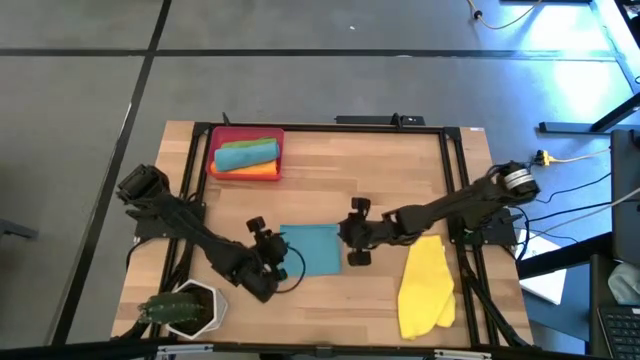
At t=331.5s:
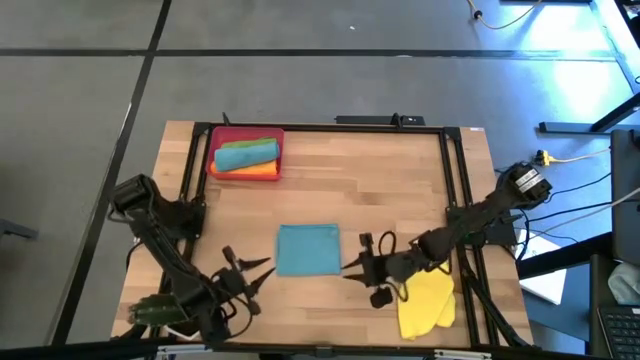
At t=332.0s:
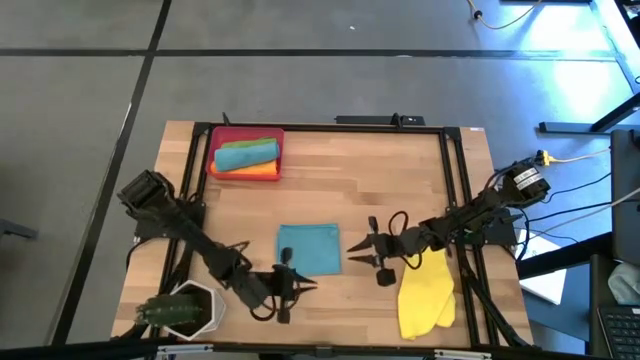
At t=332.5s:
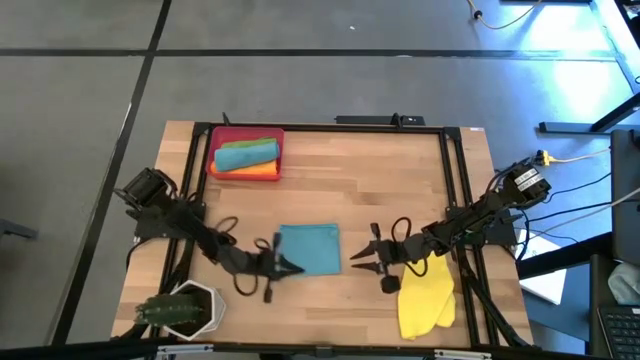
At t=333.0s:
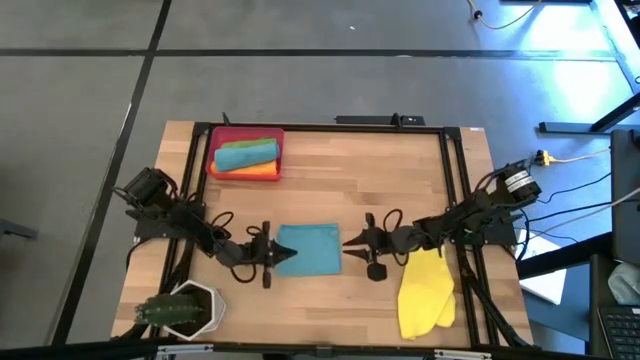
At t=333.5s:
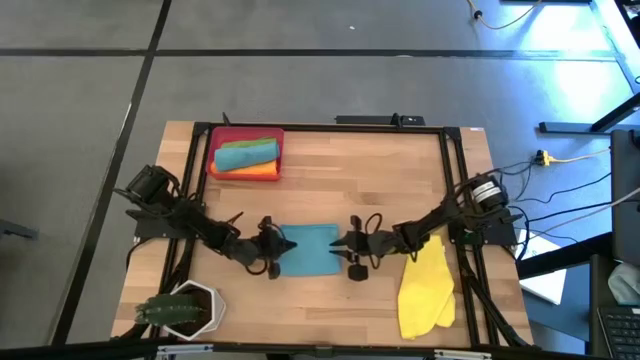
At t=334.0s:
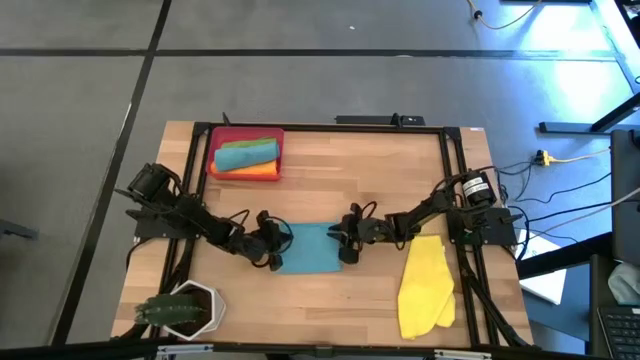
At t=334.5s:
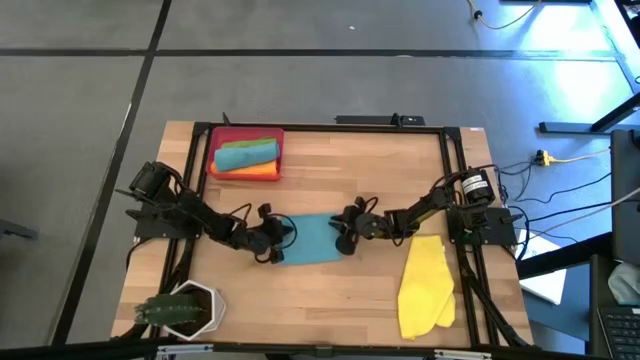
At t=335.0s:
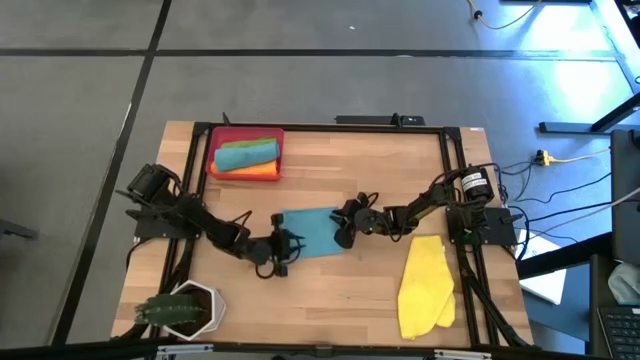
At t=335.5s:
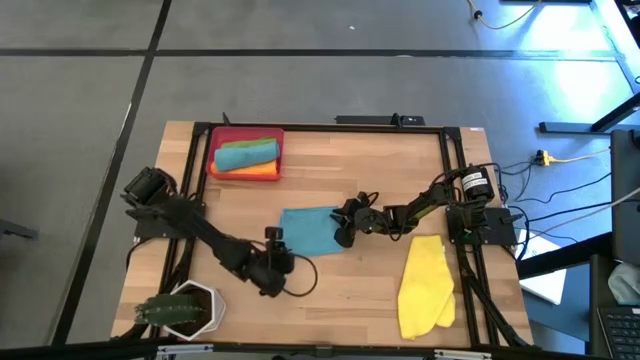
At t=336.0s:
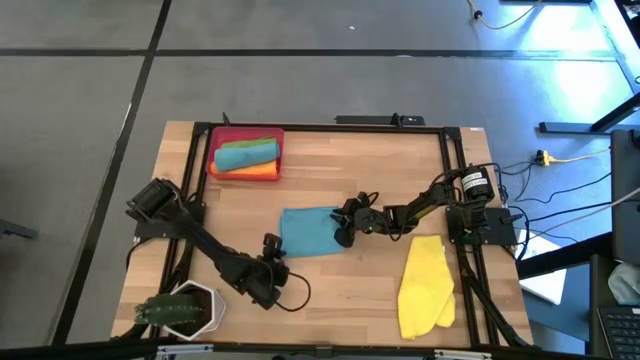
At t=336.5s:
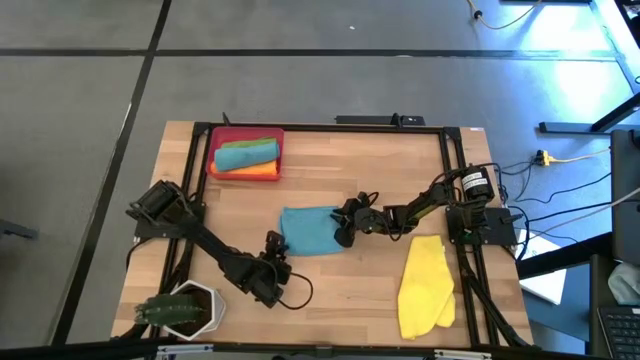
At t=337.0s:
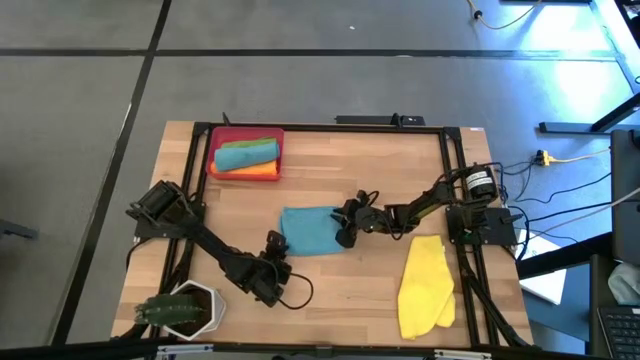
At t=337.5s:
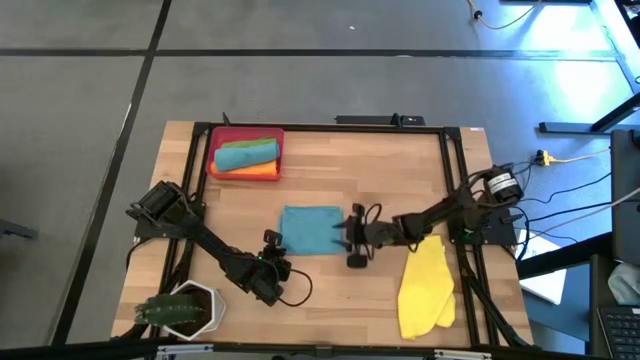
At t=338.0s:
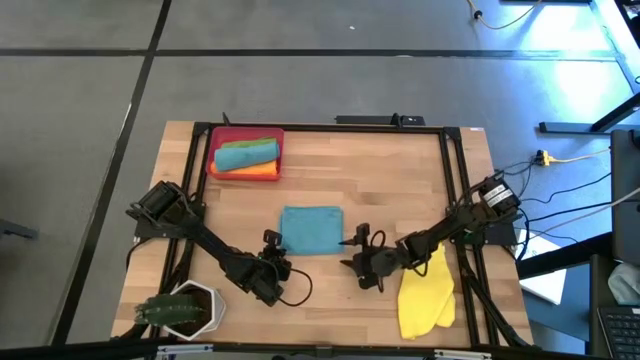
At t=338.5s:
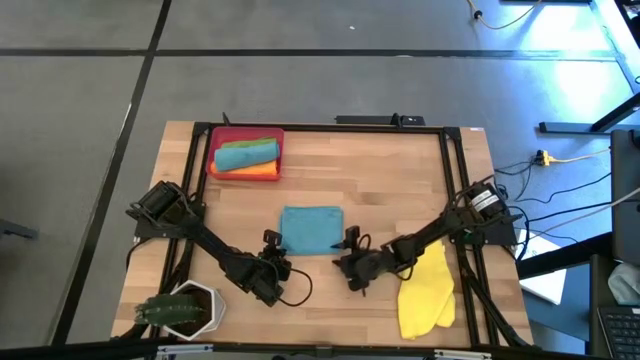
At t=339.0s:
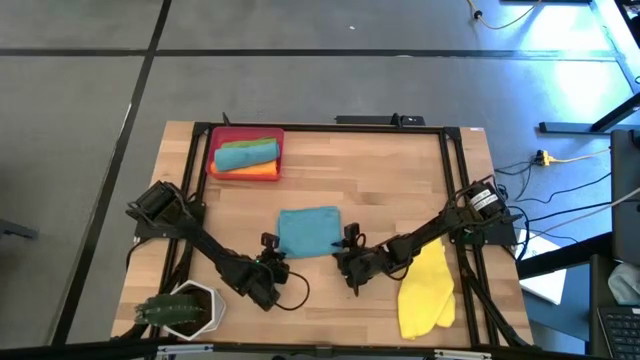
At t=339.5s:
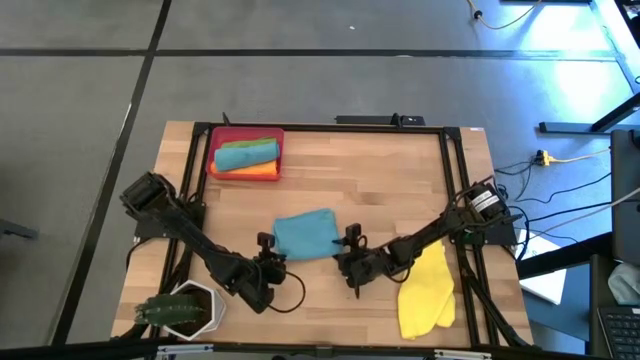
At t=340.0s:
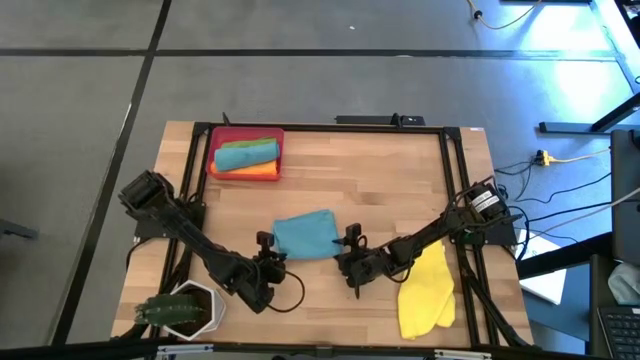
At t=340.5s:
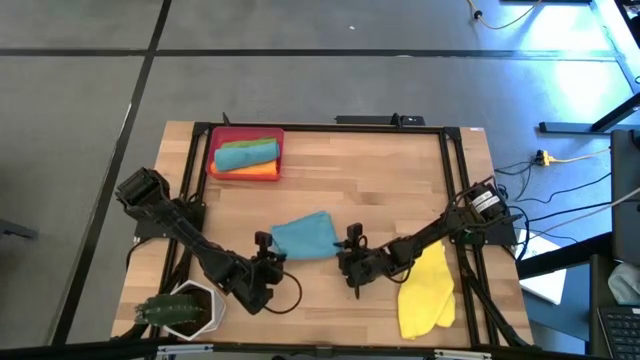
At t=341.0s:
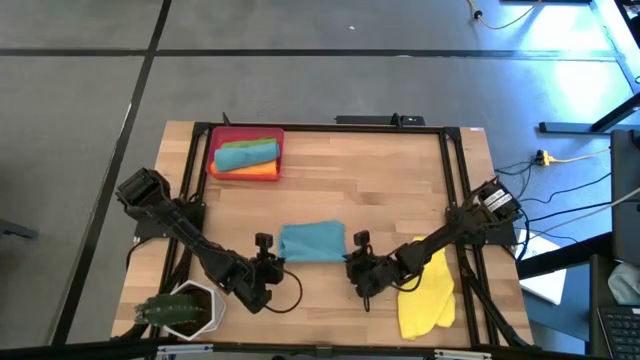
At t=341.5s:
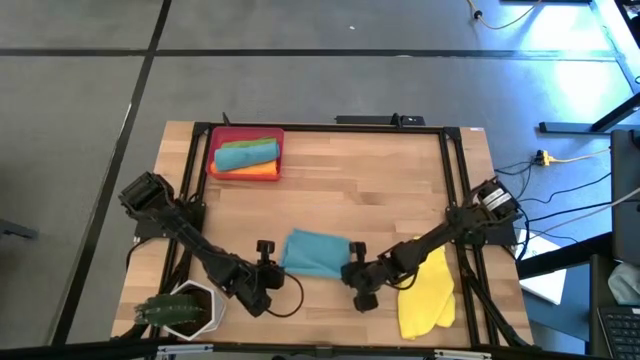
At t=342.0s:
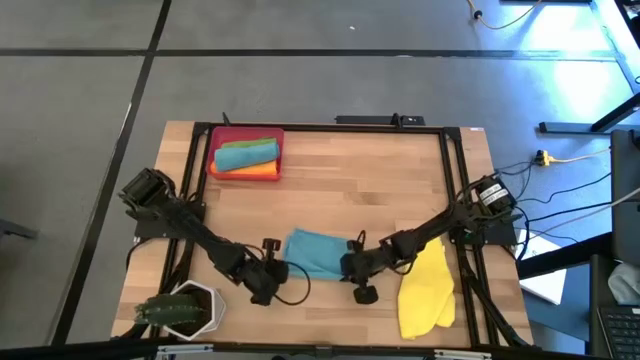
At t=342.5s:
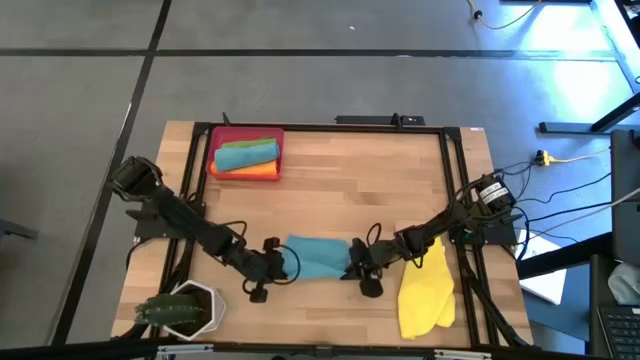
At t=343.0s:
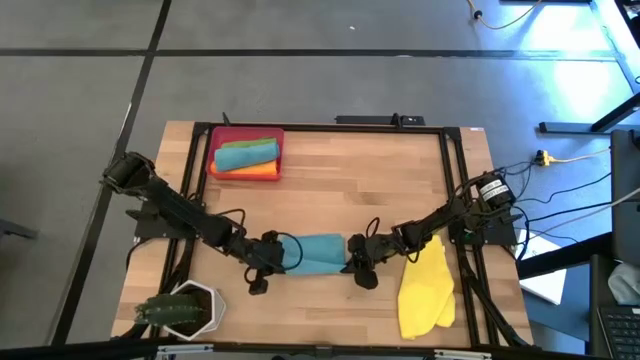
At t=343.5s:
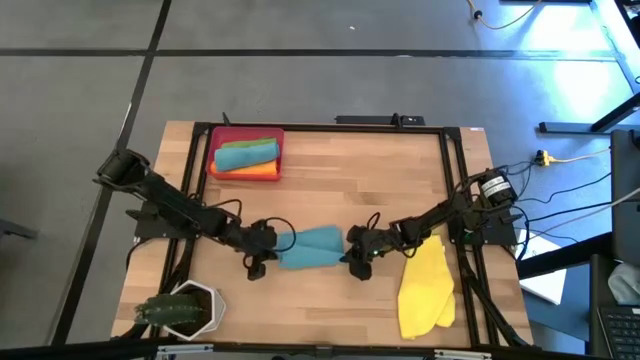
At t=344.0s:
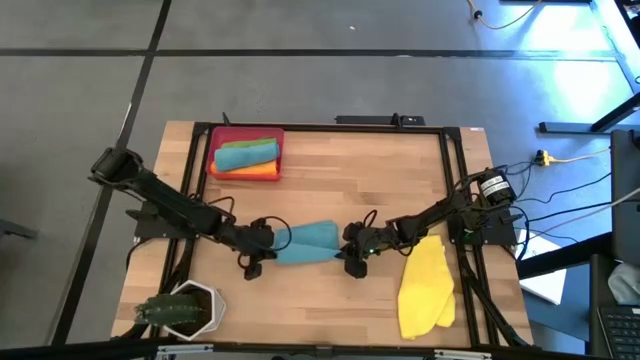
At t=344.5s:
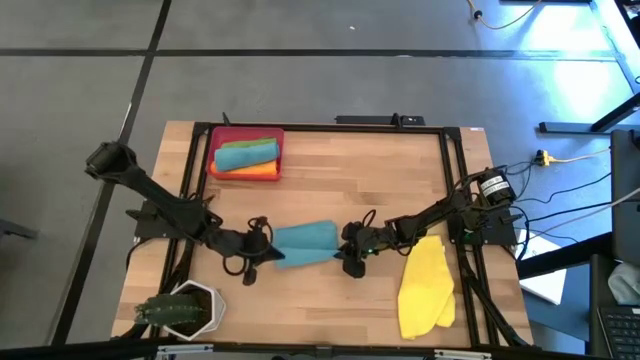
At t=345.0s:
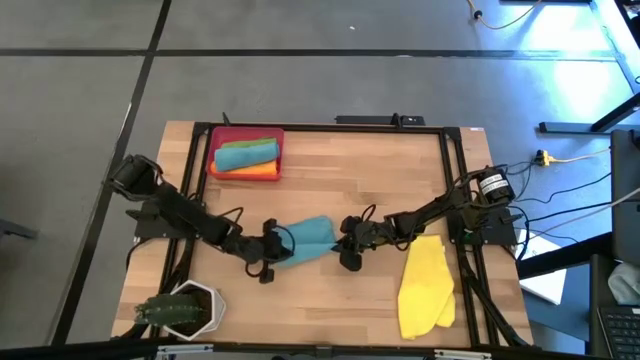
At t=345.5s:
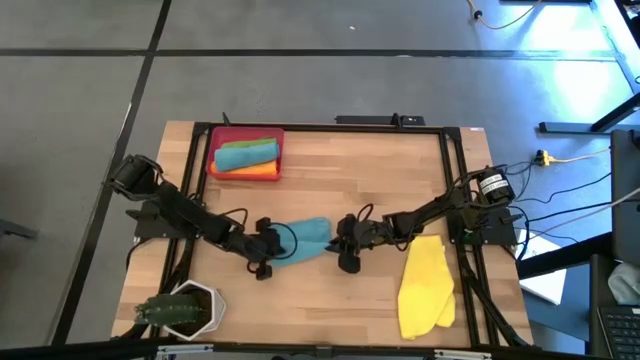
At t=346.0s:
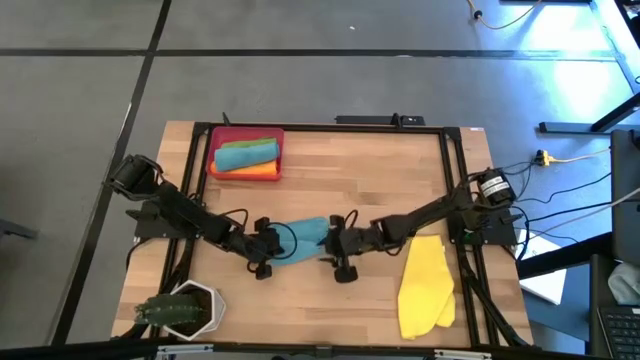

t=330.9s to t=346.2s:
Task: Roll microfiber towels into tight, uniform cylinder then place into a basket
Roll the blue microfiber towel

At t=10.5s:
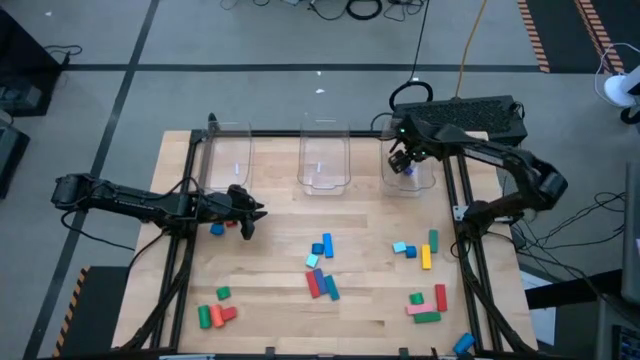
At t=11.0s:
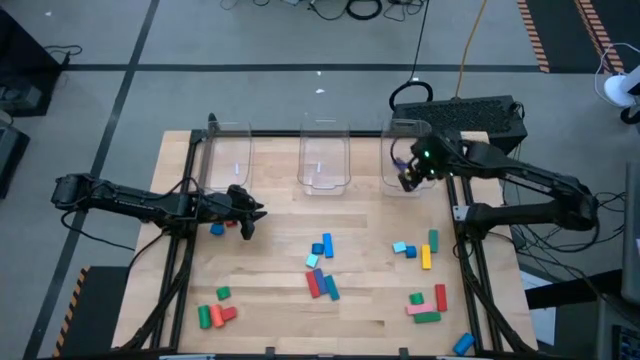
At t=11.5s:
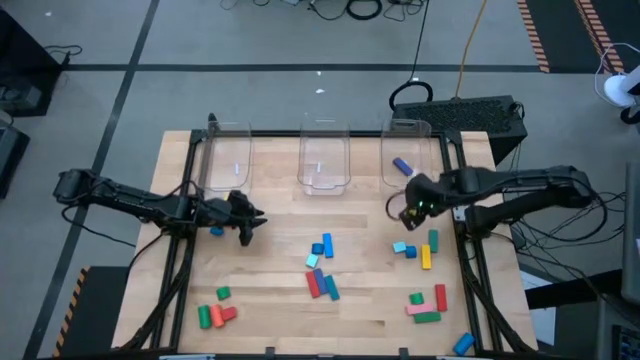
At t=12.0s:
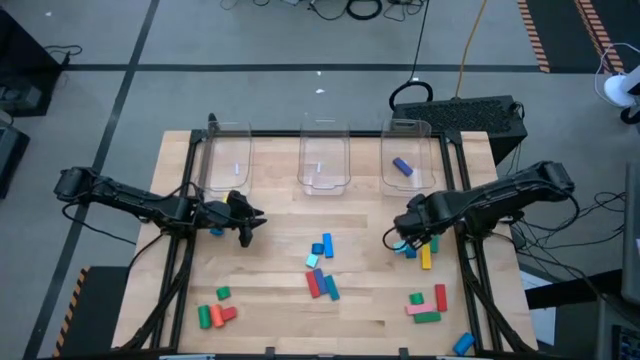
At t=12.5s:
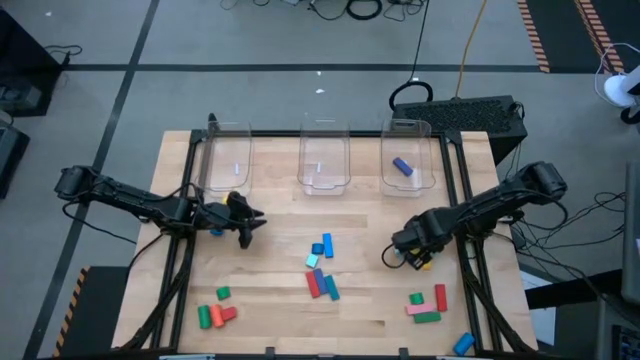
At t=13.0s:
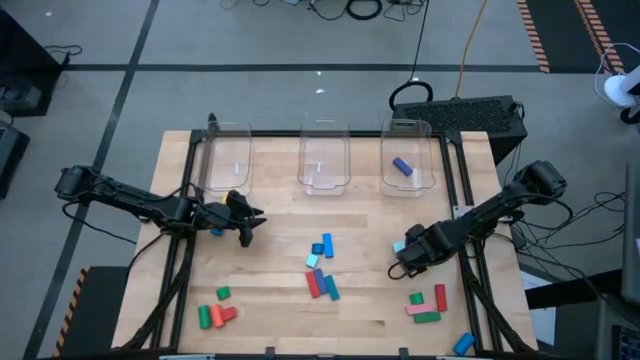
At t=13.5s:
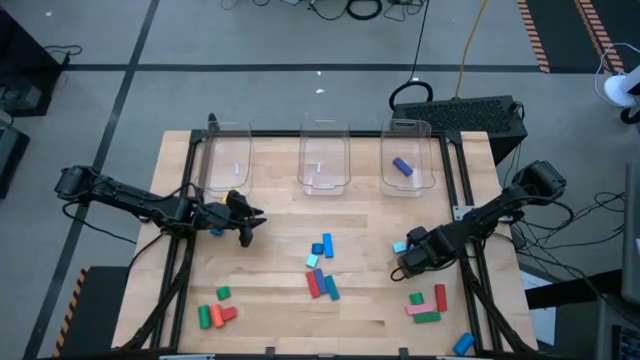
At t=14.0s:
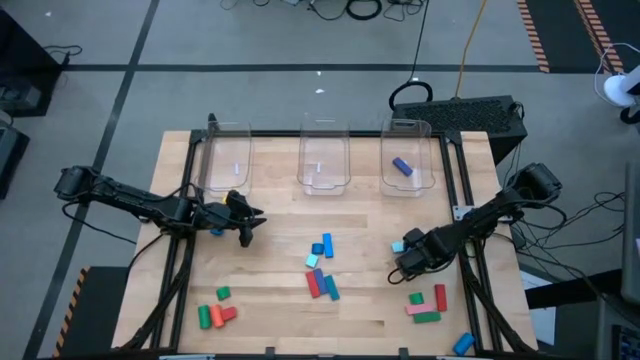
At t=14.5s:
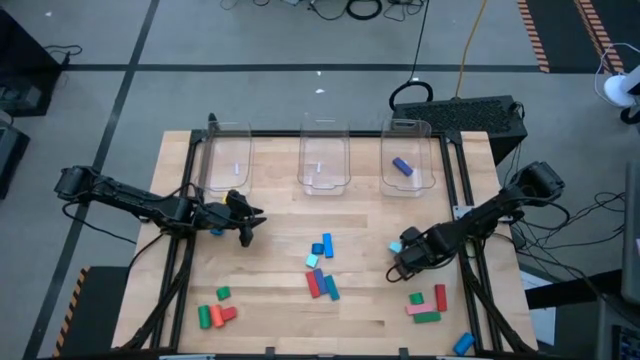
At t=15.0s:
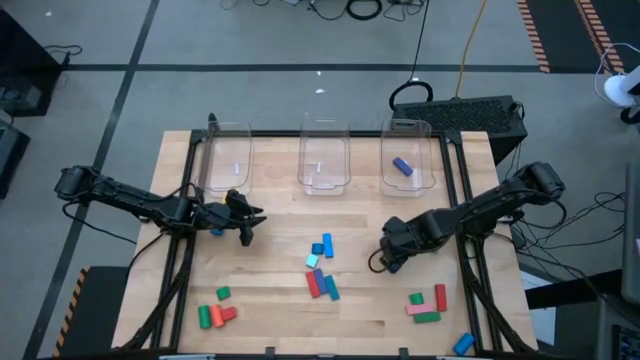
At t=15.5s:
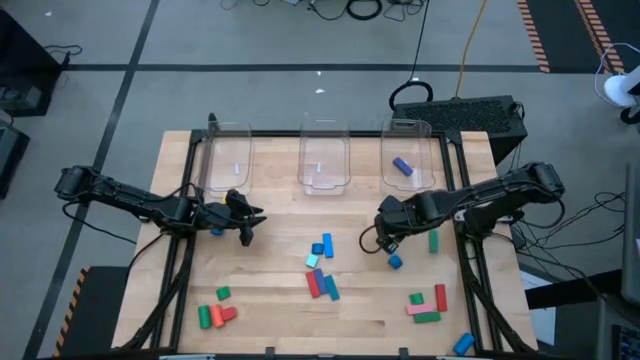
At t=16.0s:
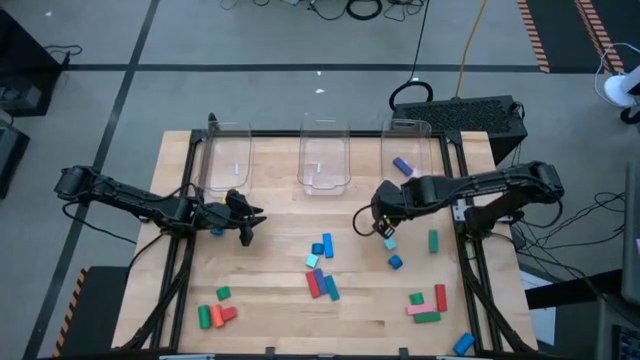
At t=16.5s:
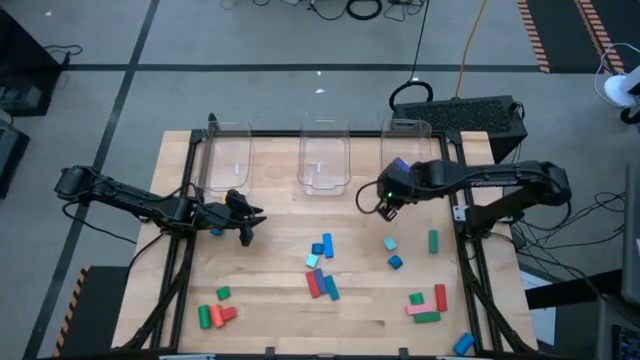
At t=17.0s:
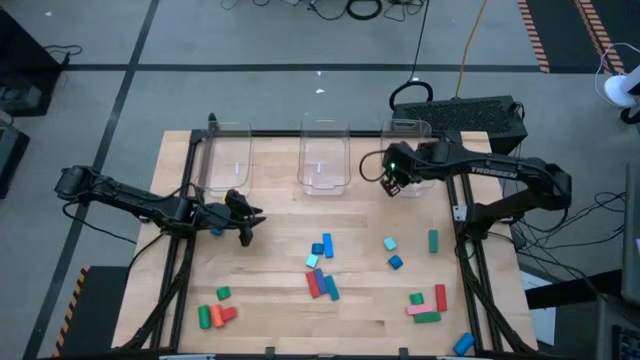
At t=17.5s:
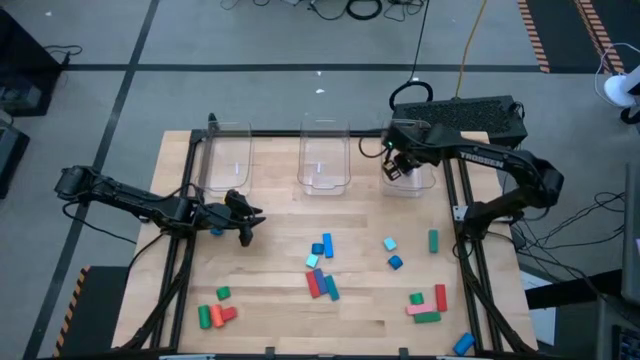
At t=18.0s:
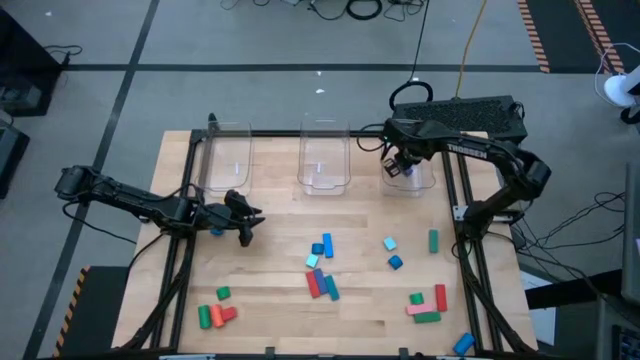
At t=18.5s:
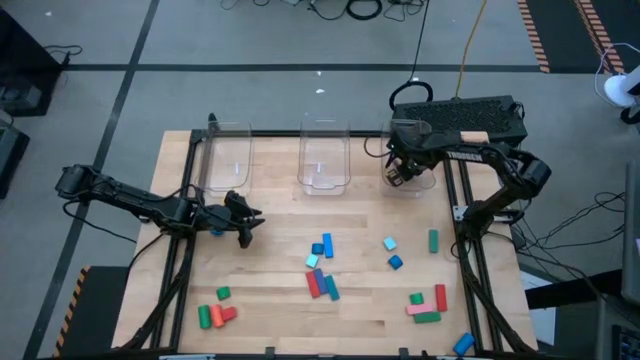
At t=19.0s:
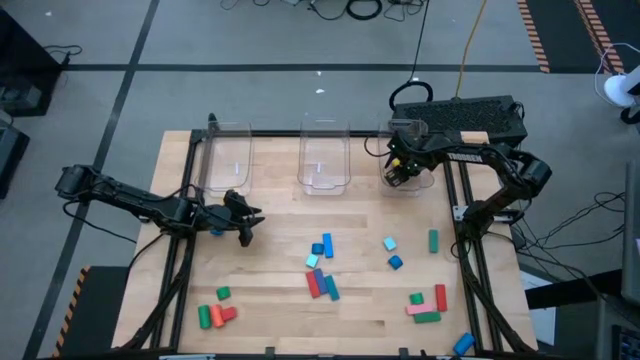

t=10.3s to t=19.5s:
Task: Sort blocks by size
Put the yellow rectangular block into the right transparent bin
